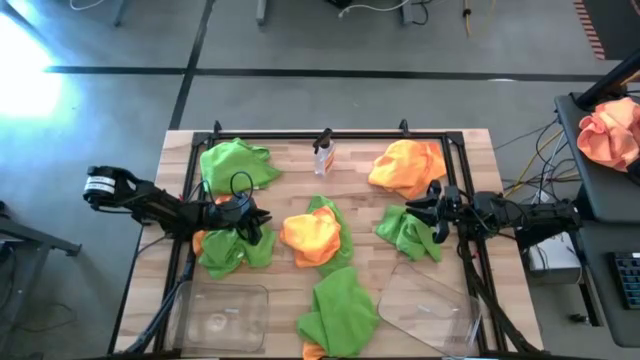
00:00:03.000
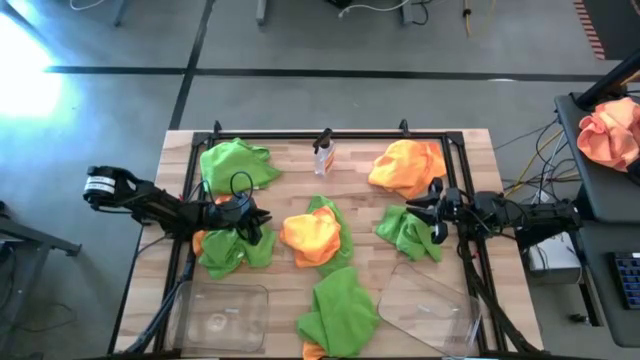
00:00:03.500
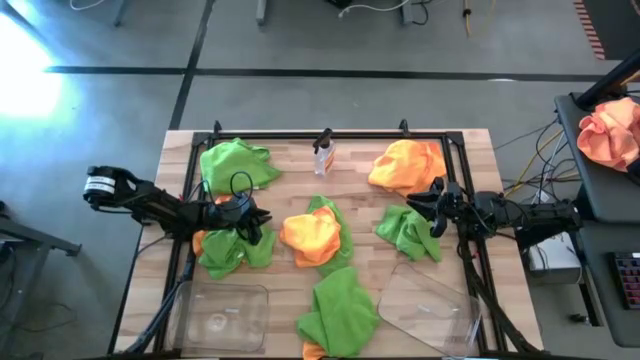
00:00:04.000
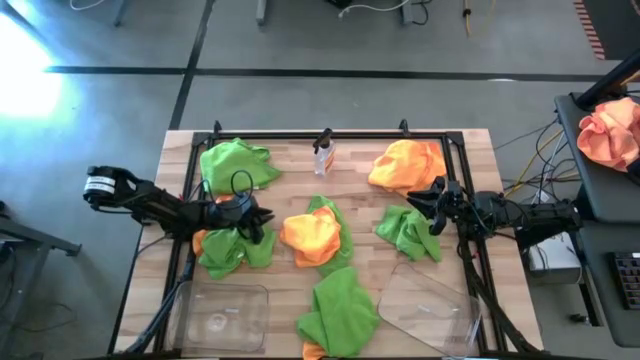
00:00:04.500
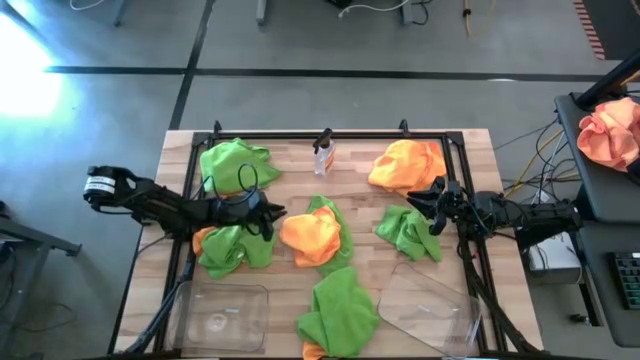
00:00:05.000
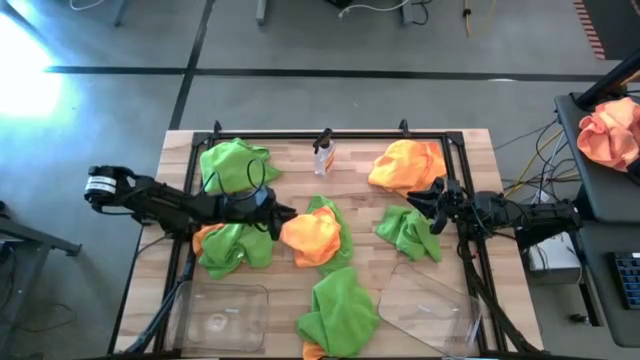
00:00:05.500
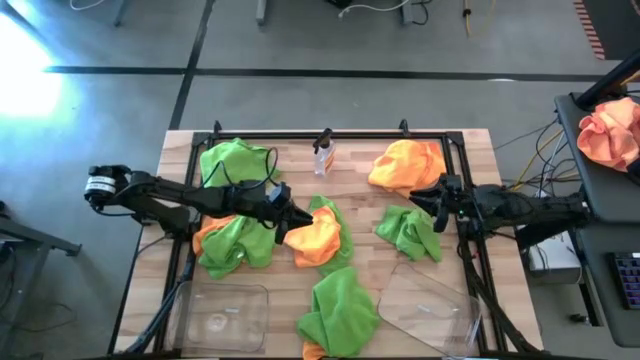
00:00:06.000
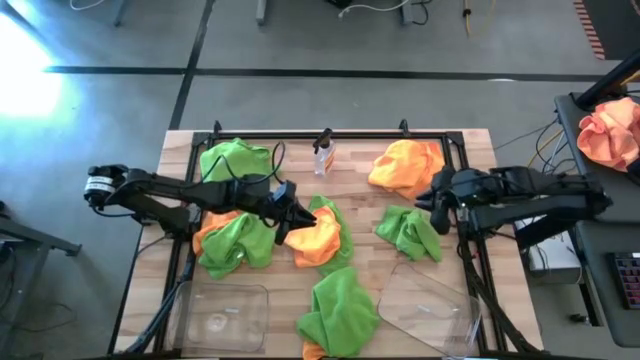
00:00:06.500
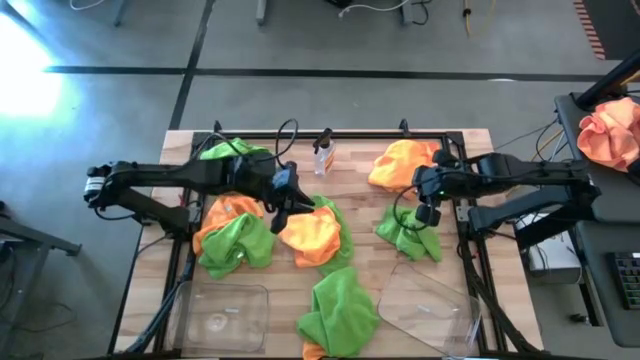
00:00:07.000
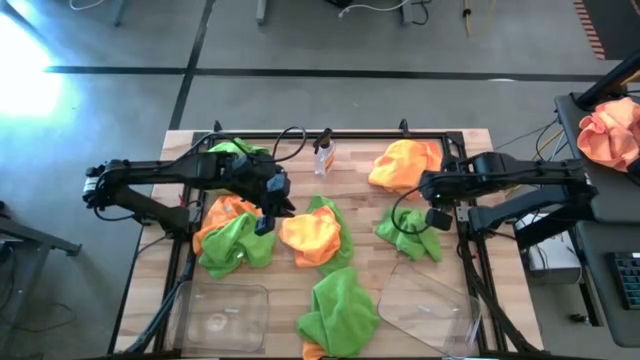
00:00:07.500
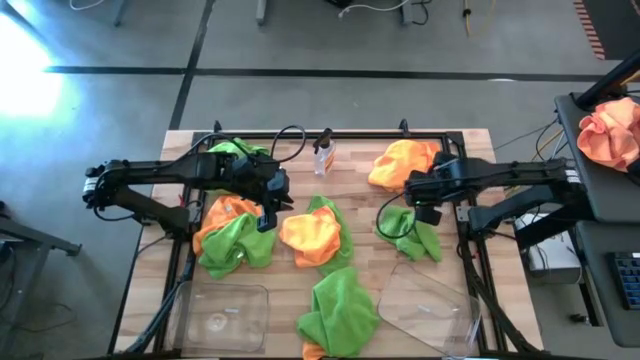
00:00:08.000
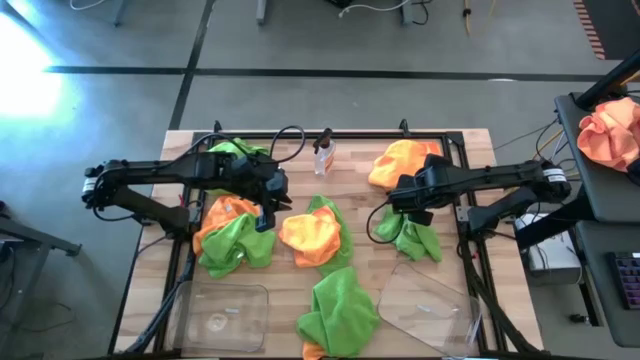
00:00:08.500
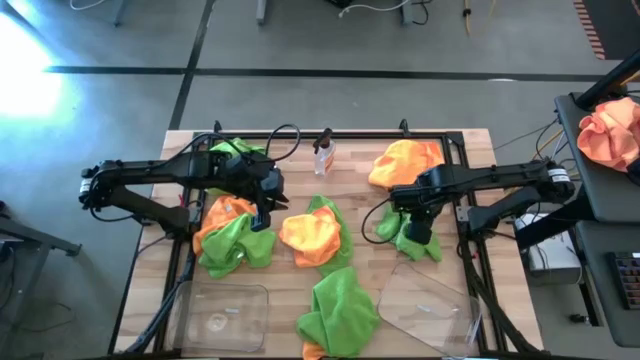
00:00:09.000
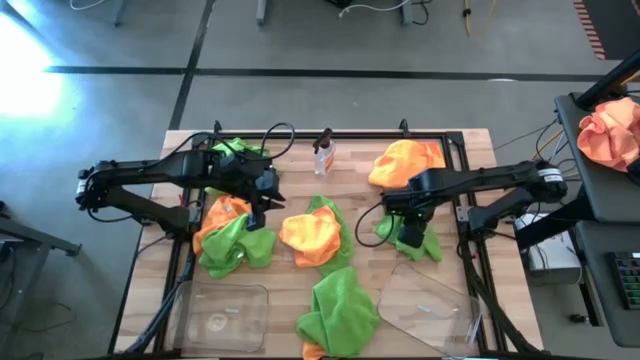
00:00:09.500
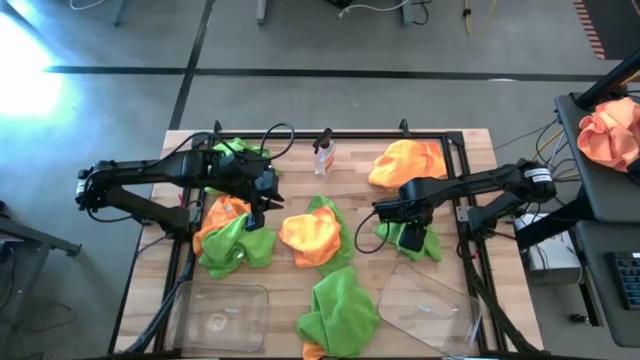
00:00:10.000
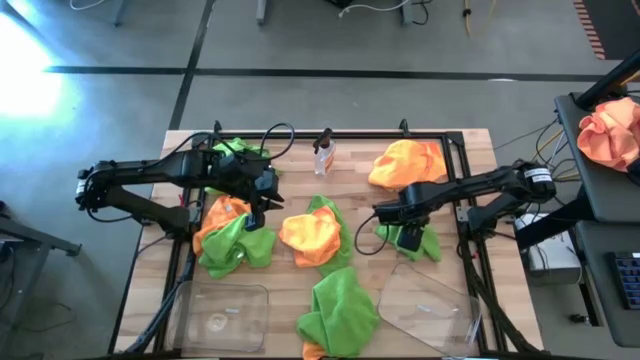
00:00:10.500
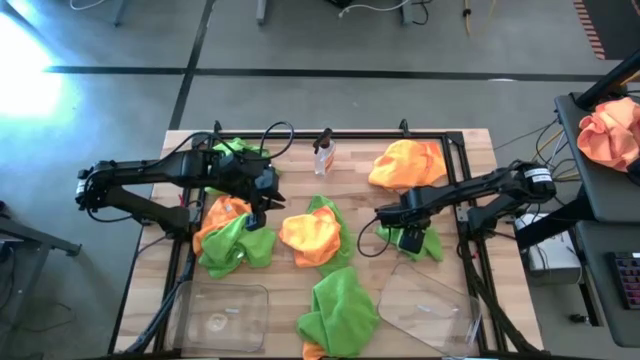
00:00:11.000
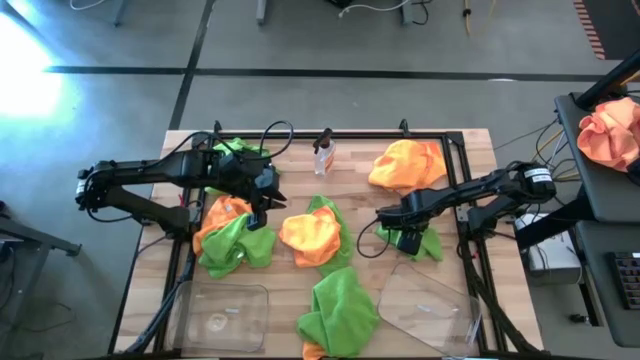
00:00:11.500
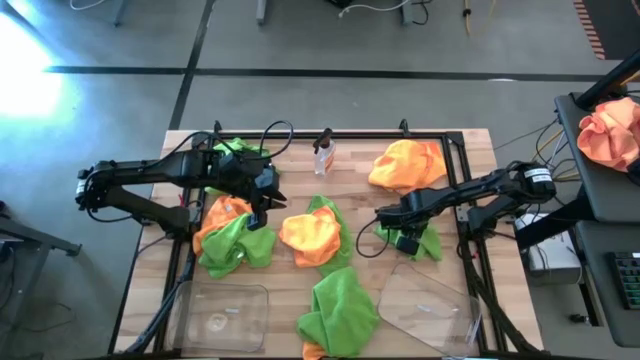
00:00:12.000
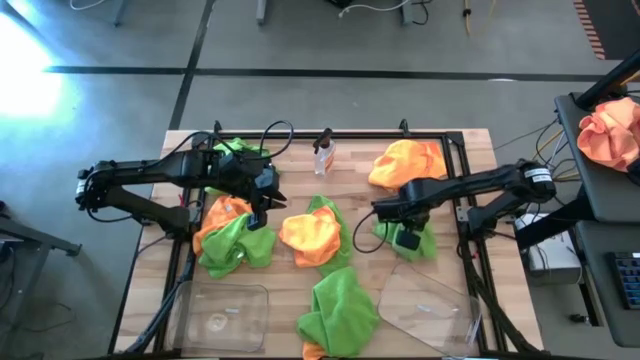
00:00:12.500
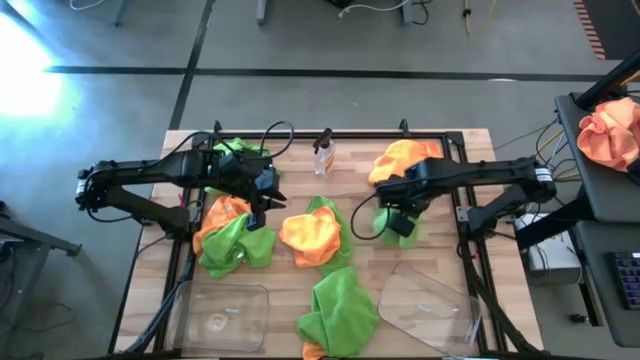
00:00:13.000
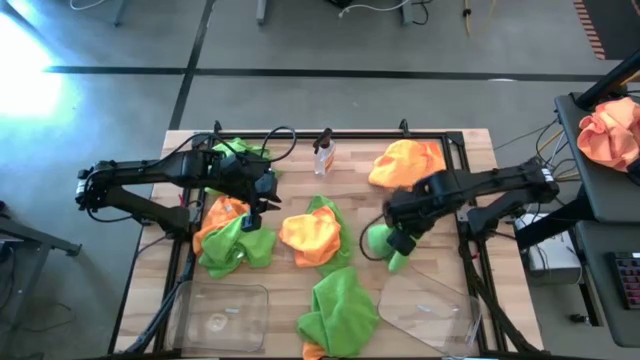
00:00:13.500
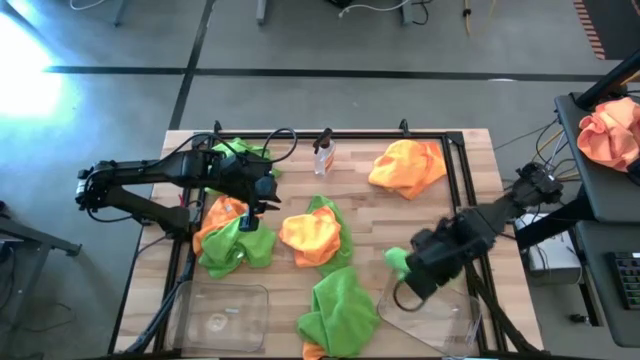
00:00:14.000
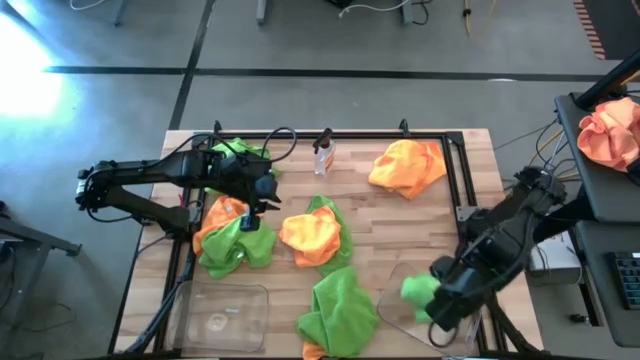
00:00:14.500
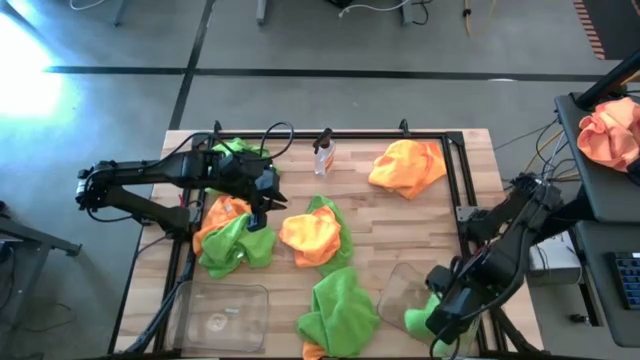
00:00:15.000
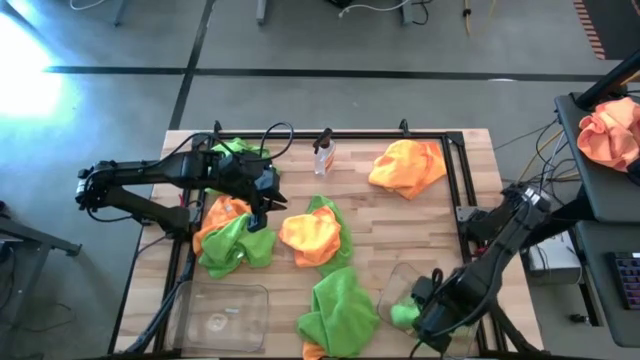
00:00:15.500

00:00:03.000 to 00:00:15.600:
Task: Sort microfiber towel by color & place in baskets
Put the green microfiber cloth into the right transparent bin

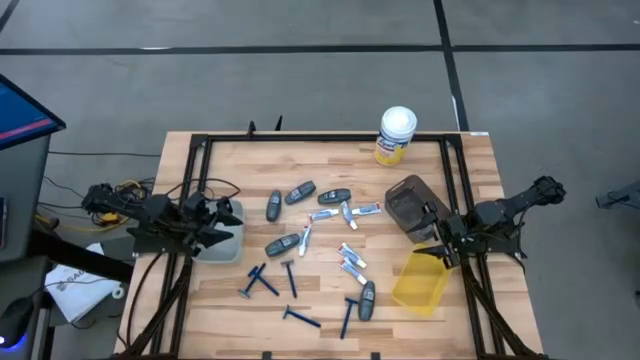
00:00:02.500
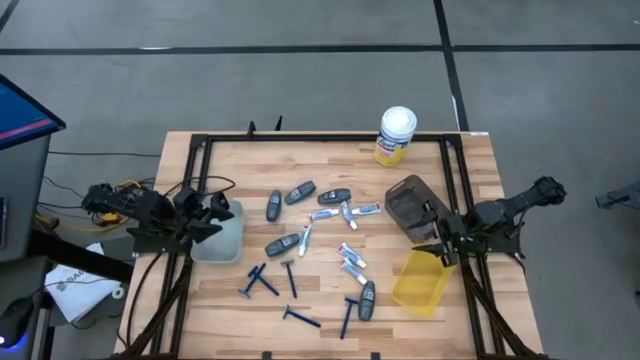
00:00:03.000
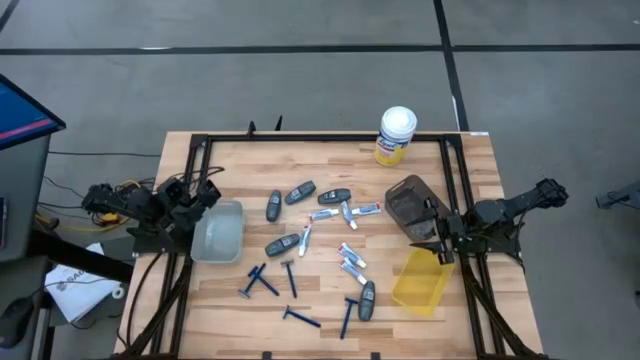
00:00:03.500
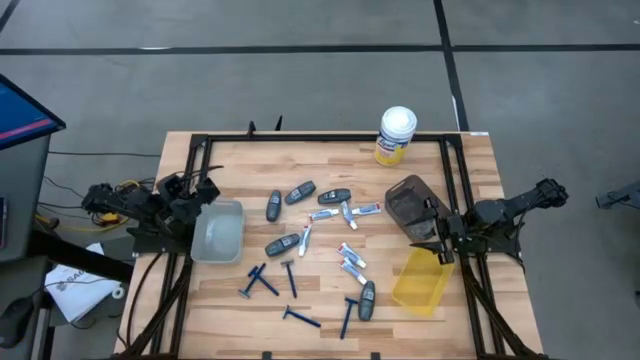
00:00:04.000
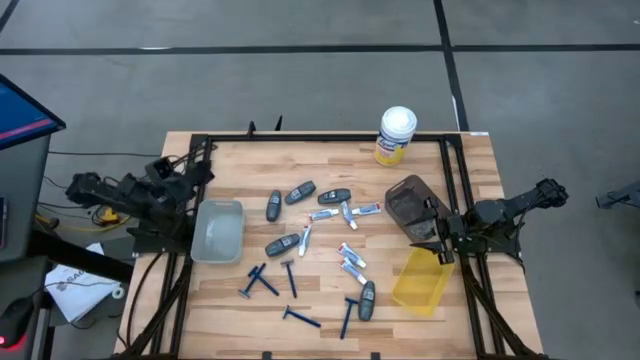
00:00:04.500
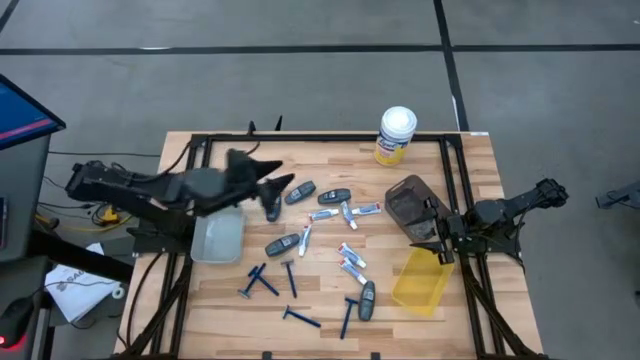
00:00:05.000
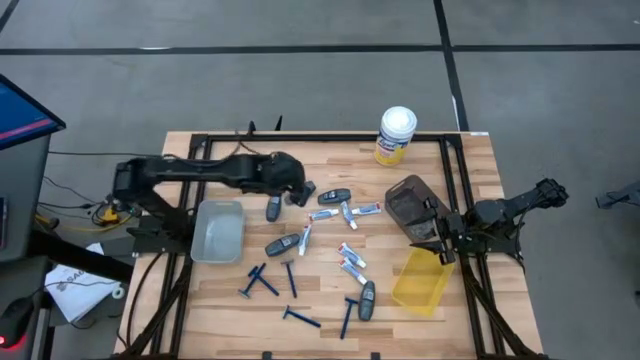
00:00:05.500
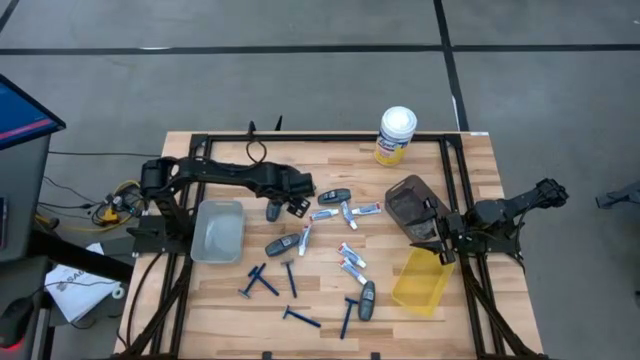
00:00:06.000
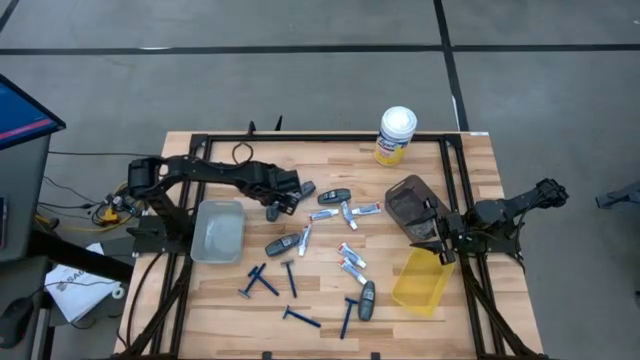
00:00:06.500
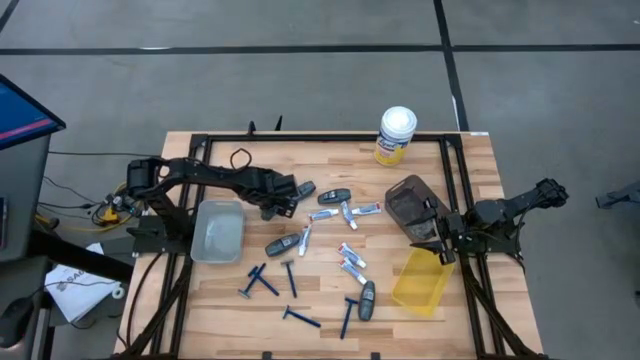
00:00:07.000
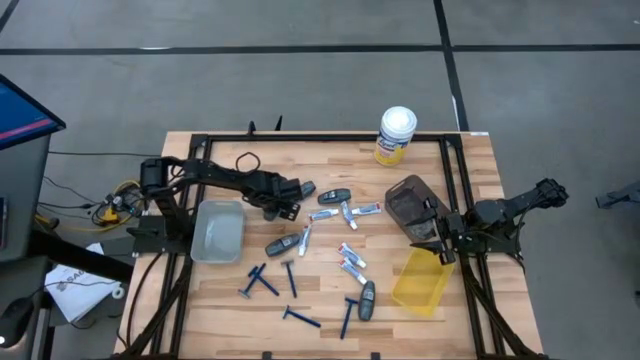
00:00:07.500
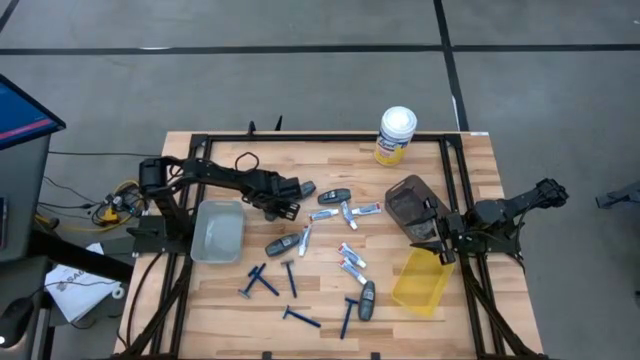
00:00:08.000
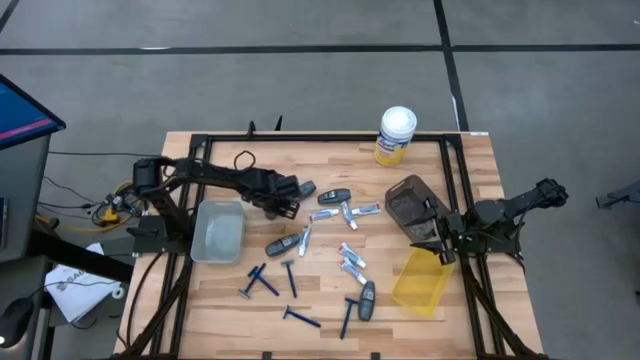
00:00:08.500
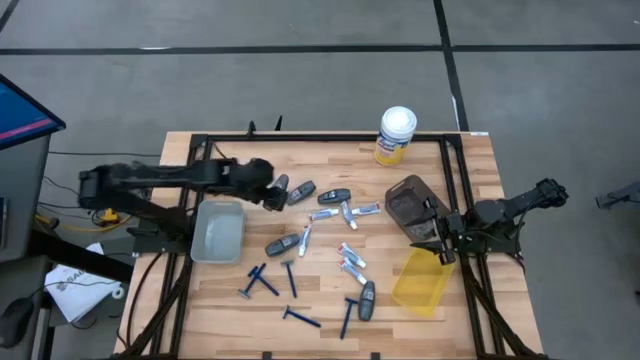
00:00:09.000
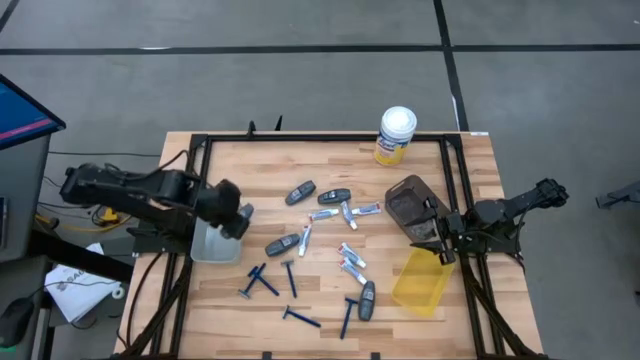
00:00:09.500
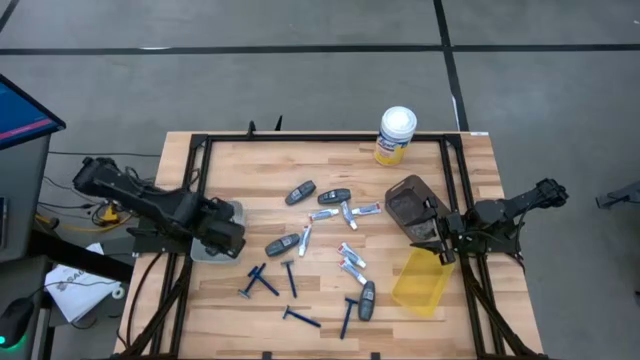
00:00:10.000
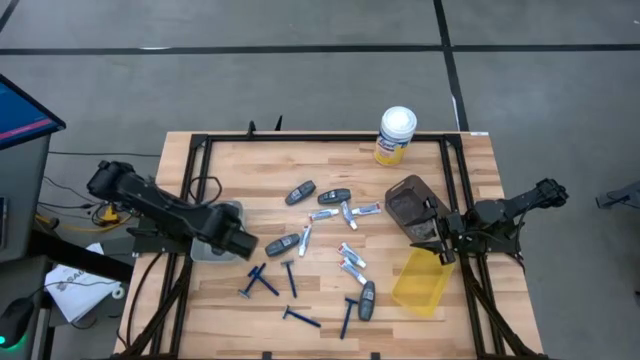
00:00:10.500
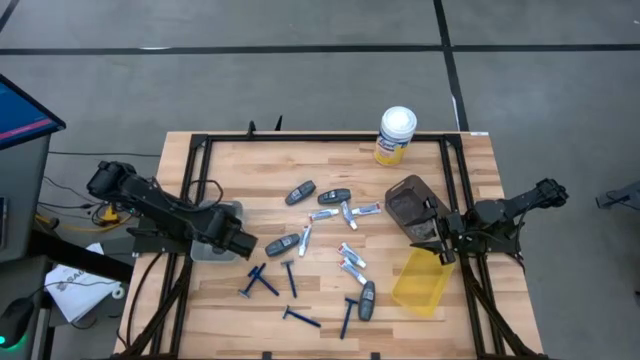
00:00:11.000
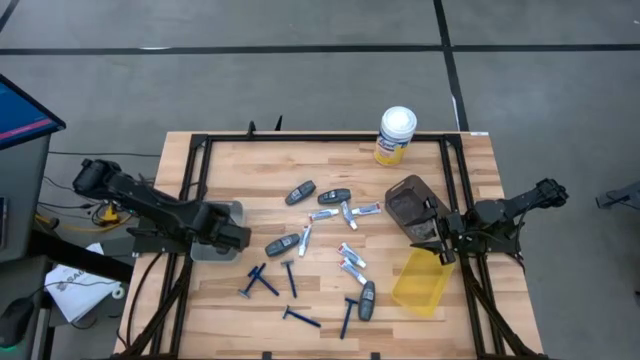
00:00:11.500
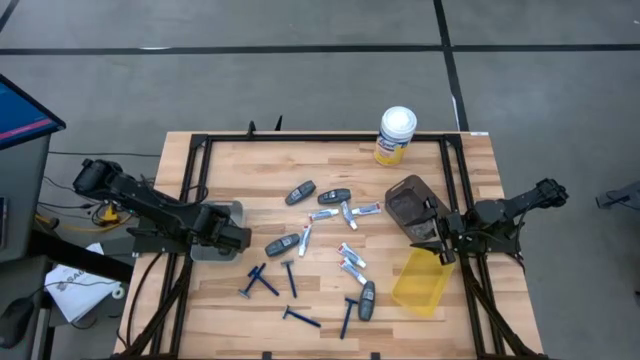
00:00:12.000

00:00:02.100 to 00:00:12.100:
Task: Pick & Place Travel size toiletries
Put the gray deodorant into the gray bin
